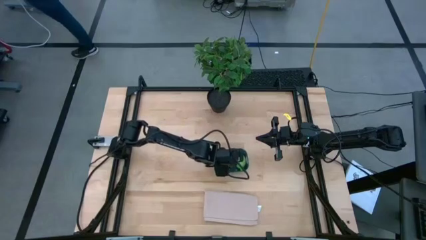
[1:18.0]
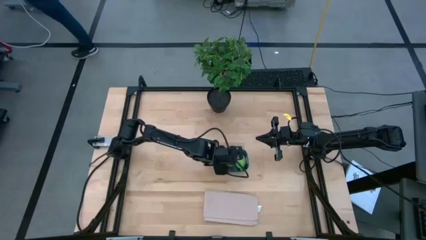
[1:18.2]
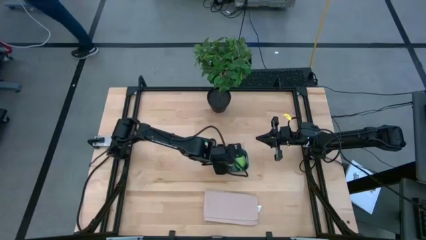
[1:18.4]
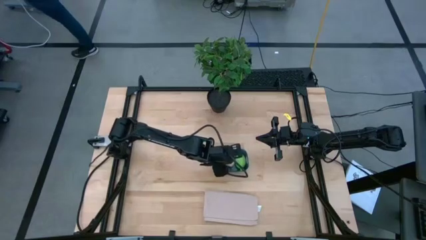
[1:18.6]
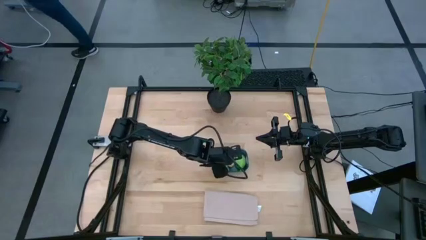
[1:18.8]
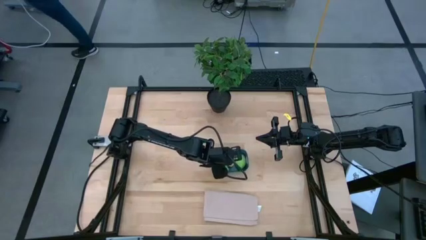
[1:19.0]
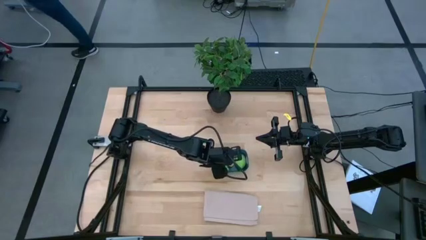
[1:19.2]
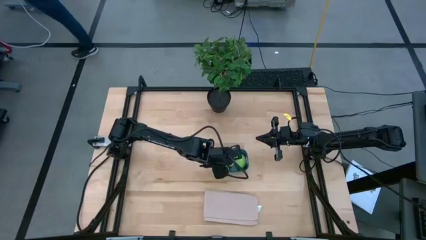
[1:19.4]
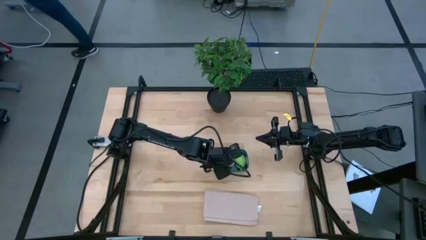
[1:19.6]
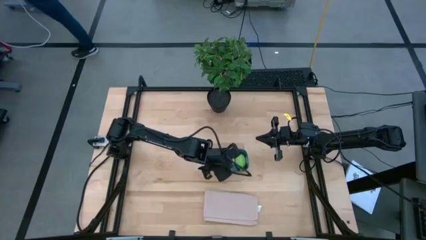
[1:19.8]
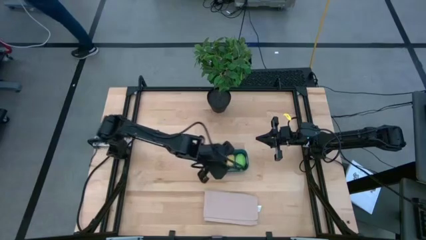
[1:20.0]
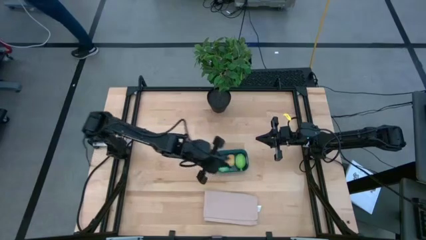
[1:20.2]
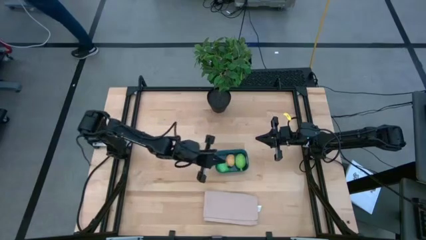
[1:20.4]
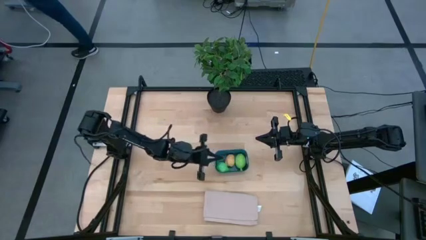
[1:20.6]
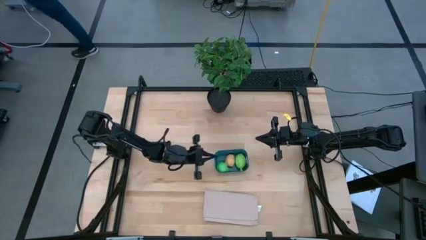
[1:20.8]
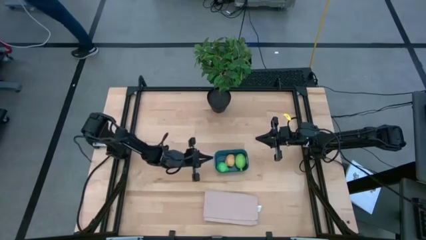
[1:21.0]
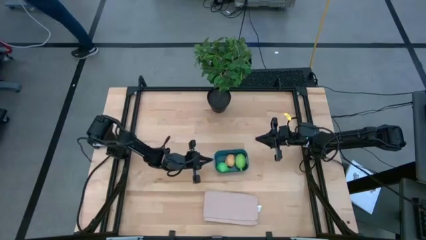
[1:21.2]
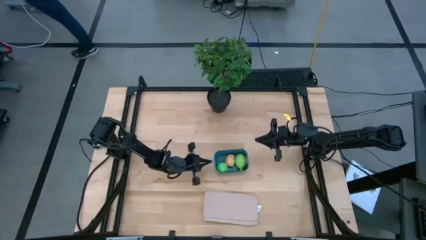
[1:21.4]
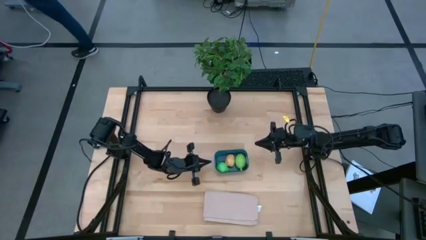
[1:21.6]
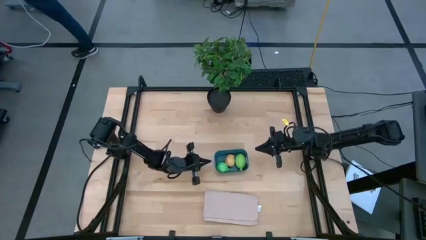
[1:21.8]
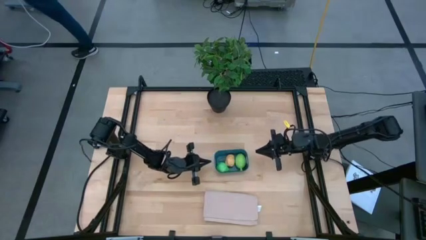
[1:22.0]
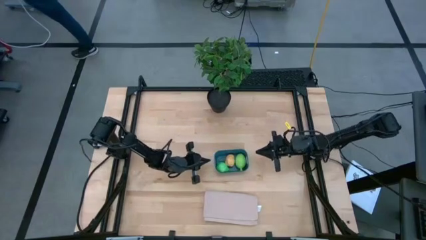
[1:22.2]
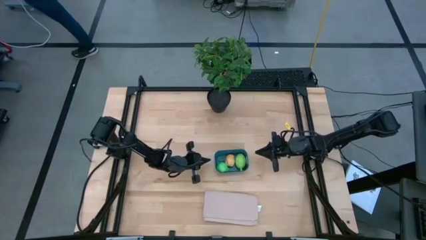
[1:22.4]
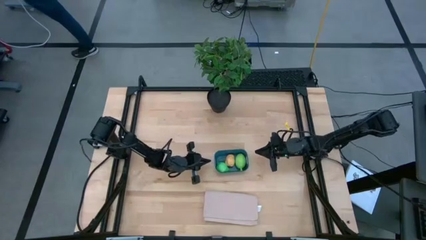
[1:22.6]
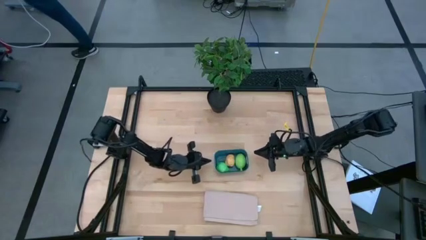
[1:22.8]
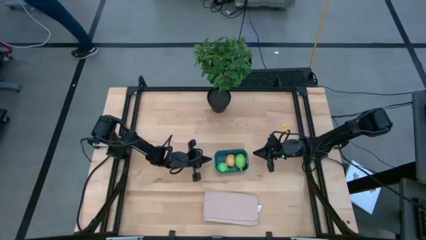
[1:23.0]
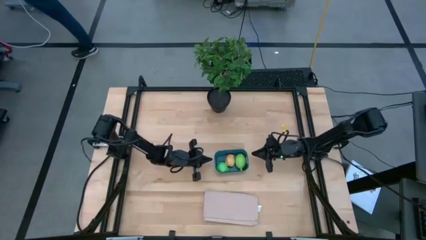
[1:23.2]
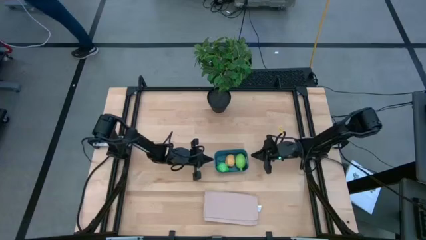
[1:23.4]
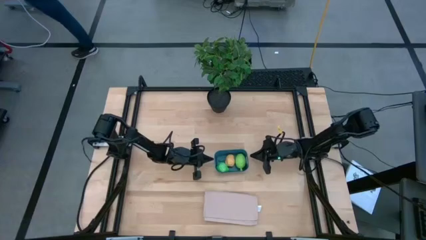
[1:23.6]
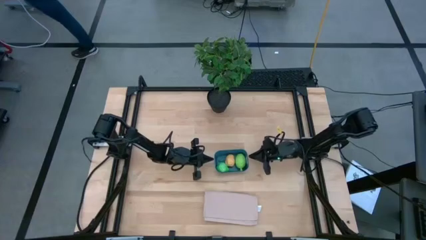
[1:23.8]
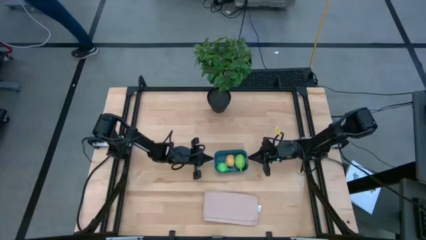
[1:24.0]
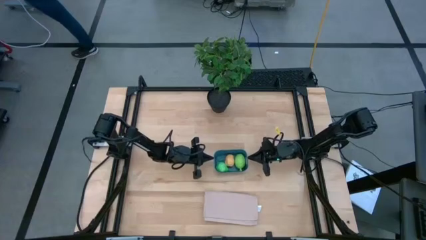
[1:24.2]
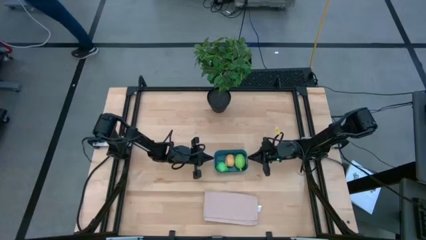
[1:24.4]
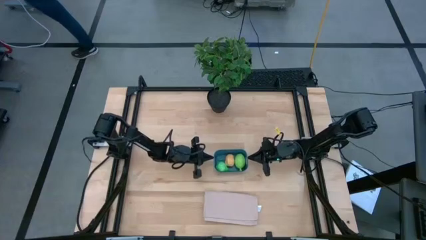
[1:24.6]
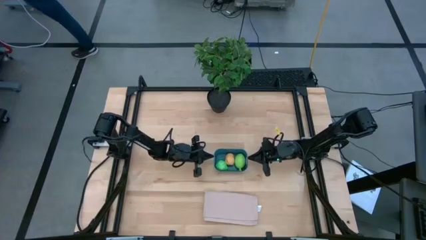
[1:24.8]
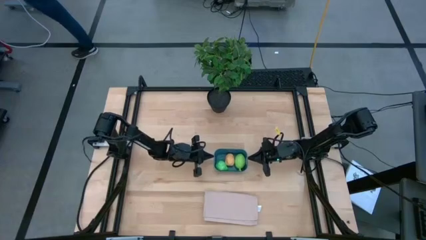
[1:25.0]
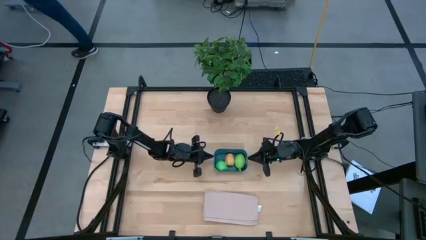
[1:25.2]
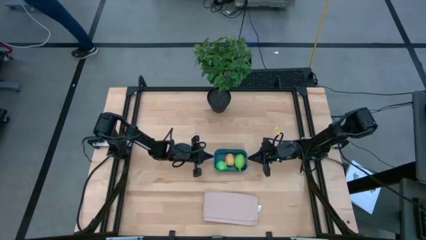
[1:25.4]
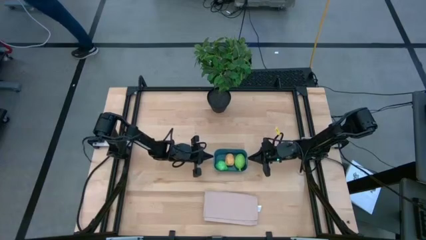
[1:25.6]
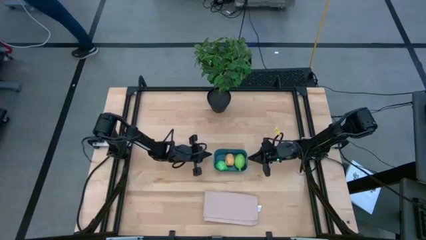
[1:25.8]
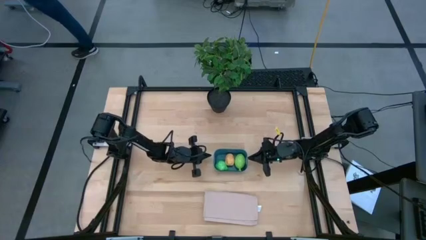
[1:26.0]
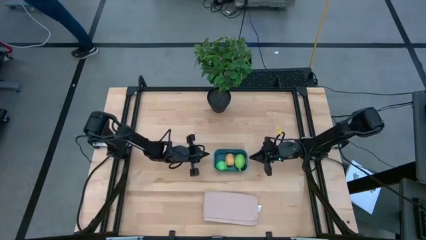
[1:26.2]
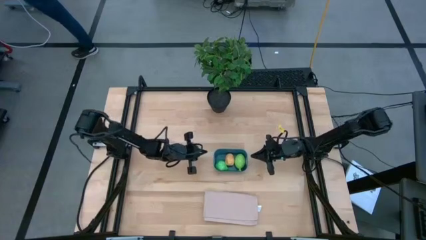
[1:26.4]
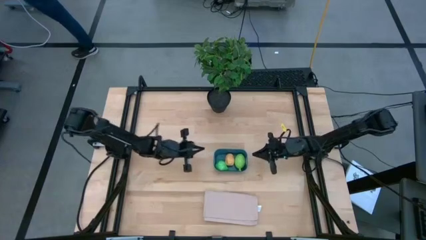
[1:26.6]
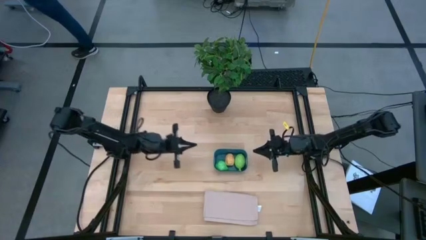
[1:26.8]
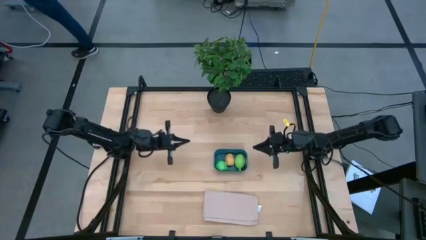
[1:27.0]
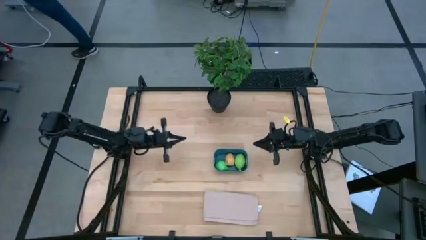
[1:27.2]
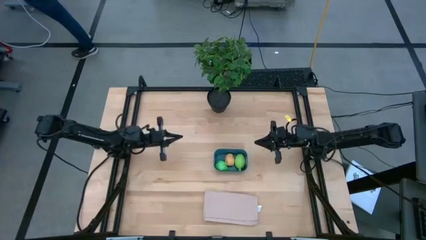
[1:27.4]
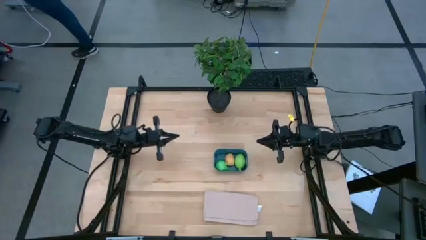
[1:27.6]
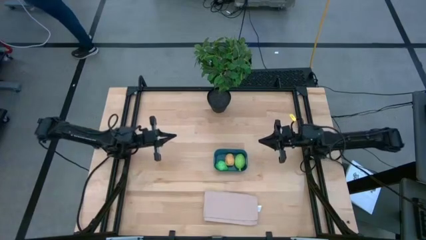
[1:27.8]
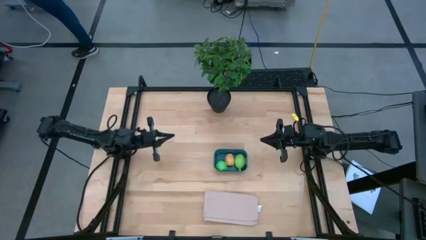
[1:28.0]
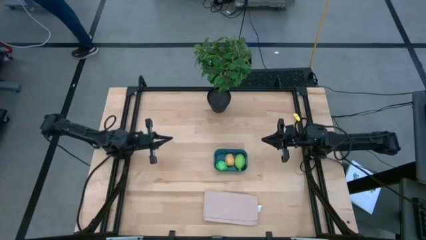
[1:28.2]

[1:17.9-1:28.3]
Task: Pick and placing Produce into tupperware
Return to Home Position
